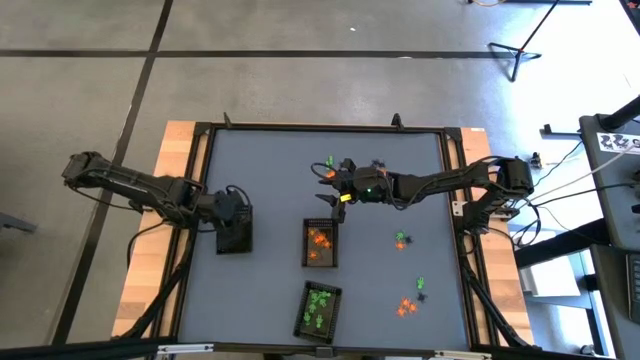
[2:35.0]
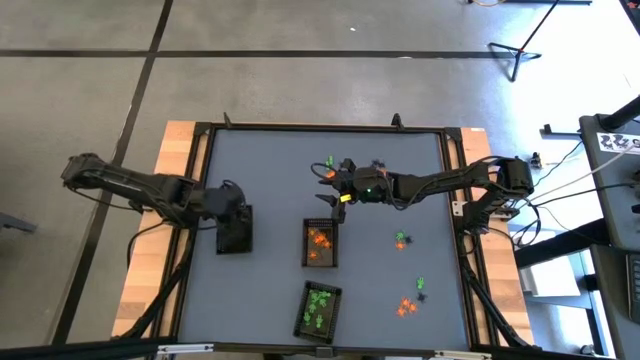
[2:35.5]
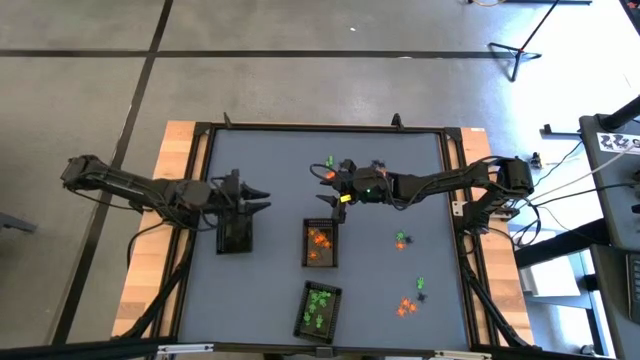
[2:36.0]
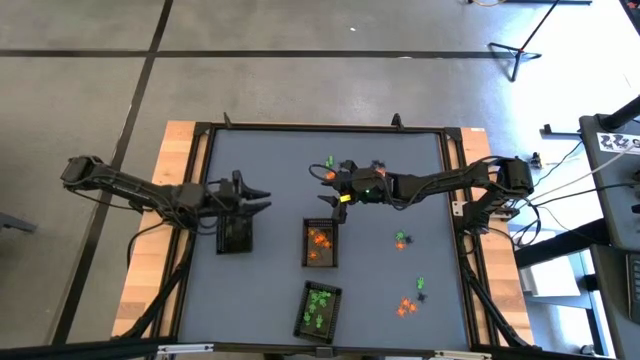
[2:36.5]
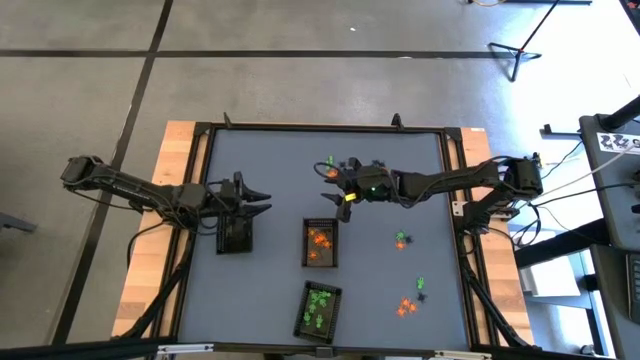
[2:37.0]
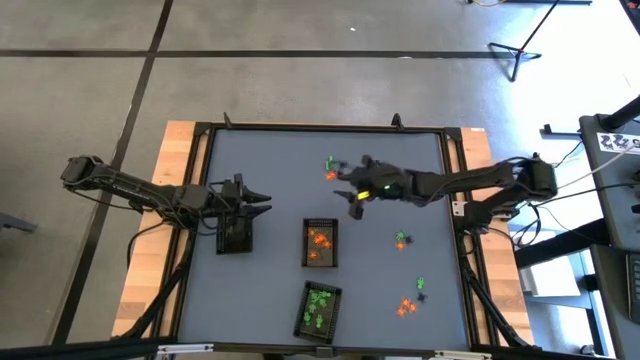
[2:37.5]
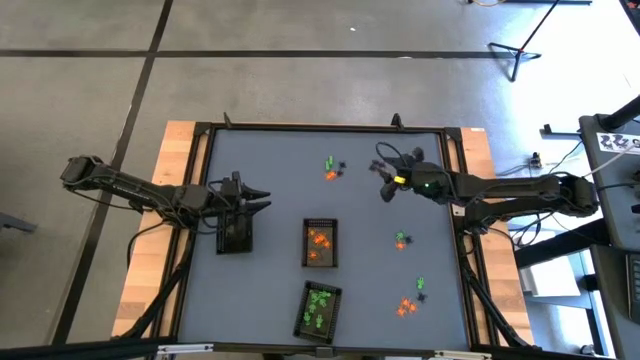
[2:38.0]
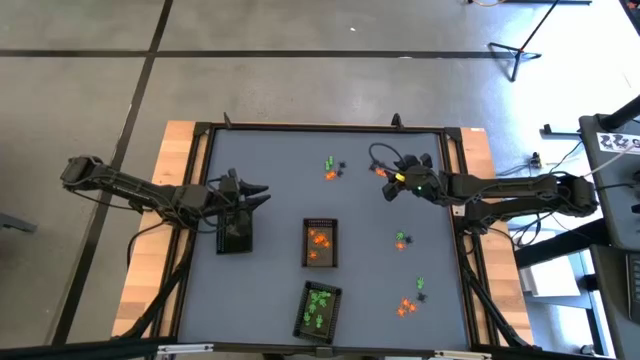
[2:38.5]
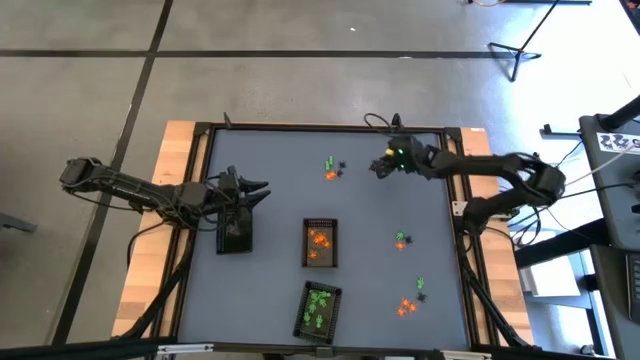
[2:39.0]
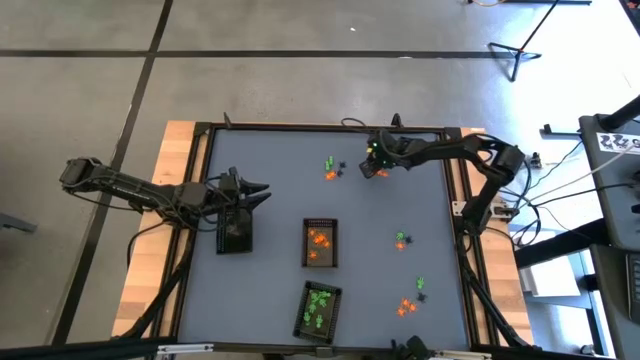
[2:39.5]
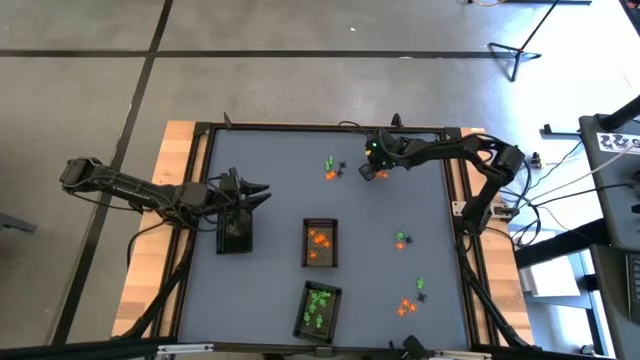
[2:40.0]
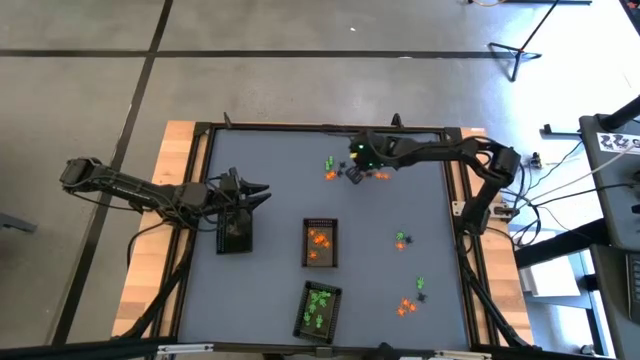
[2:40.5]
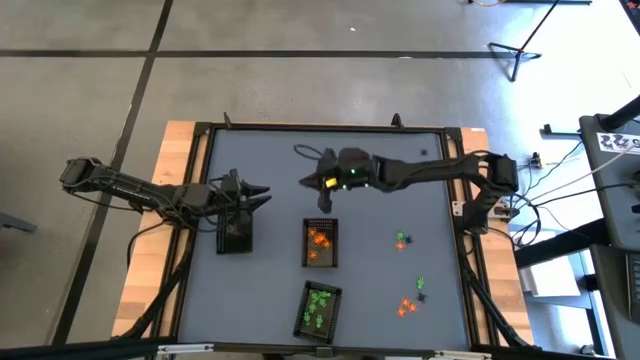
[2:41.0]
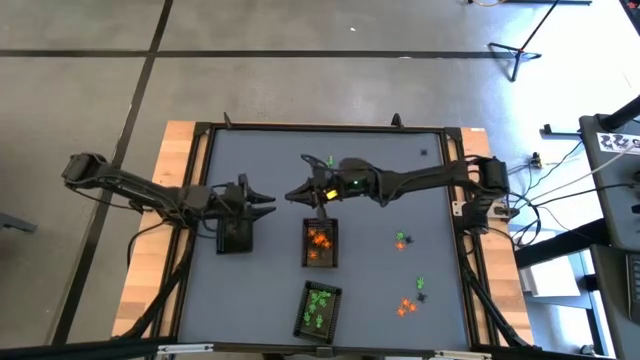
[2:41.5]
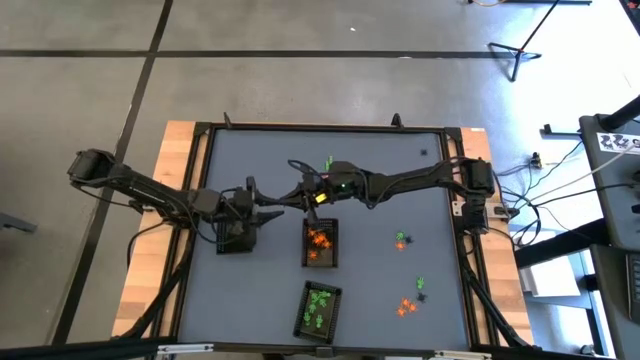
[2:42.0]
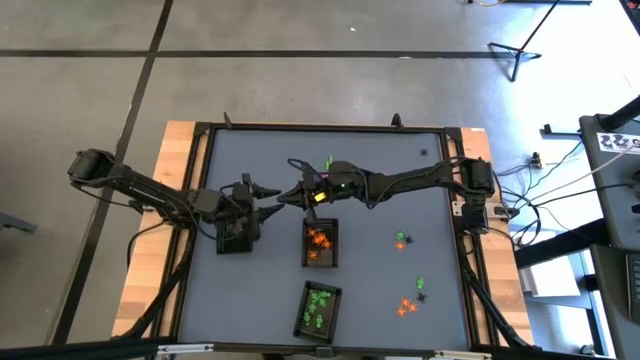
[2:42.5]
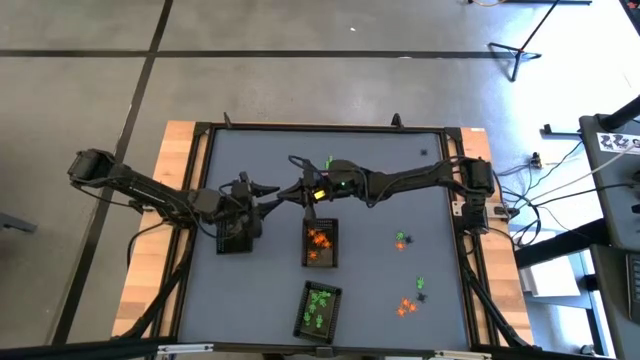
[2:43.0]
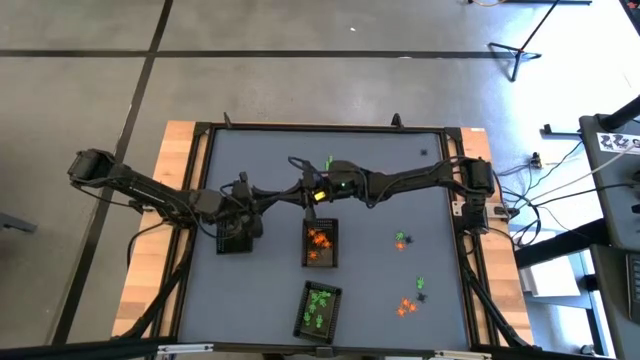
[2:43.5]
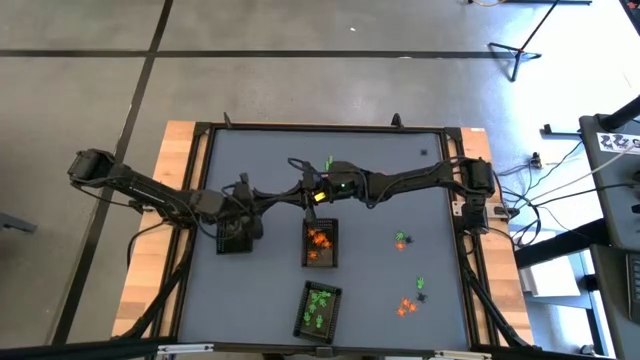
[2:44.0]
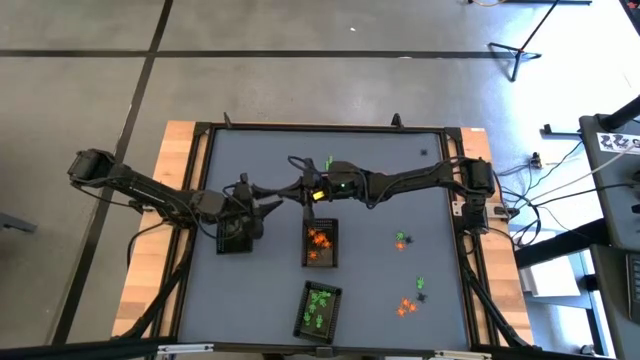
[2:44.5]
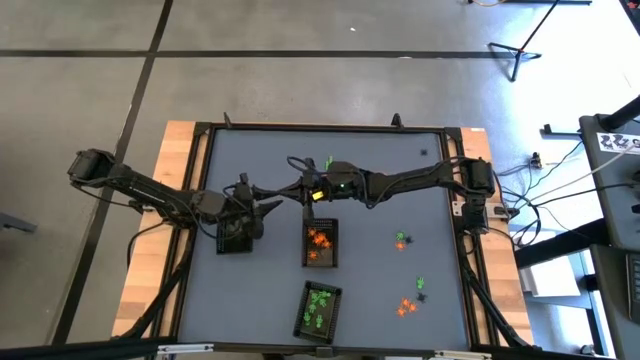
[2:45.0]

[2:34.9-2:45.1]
Task: Sort Halloween decoration
Put the black spider toy into the top left black basket

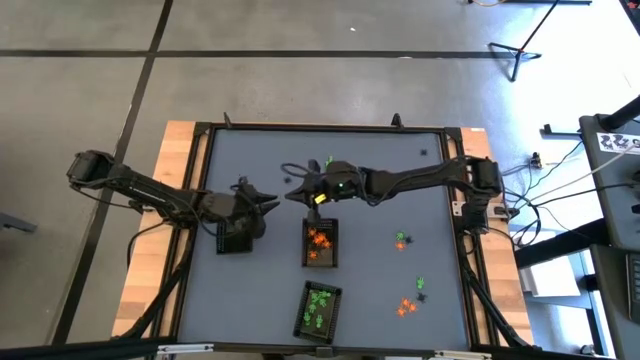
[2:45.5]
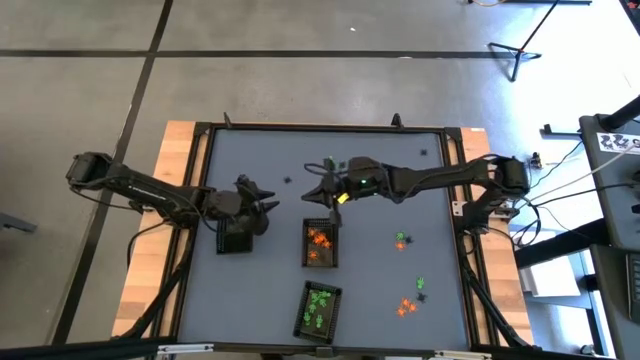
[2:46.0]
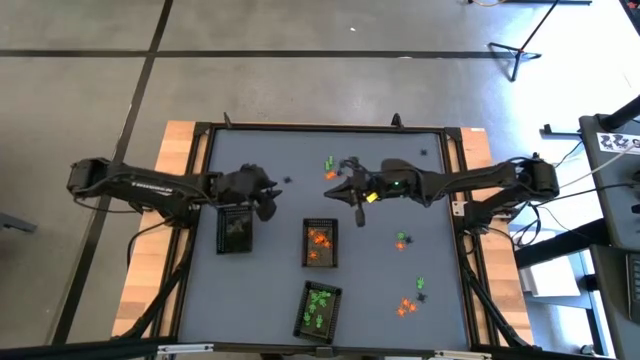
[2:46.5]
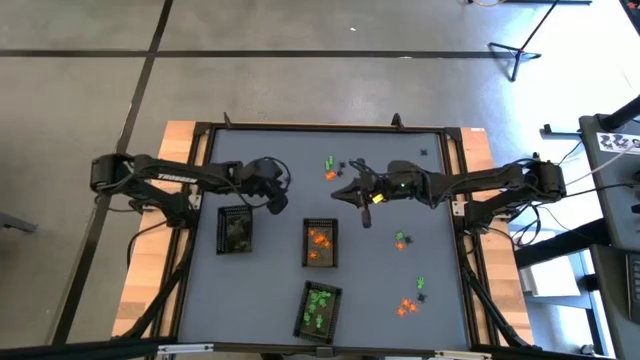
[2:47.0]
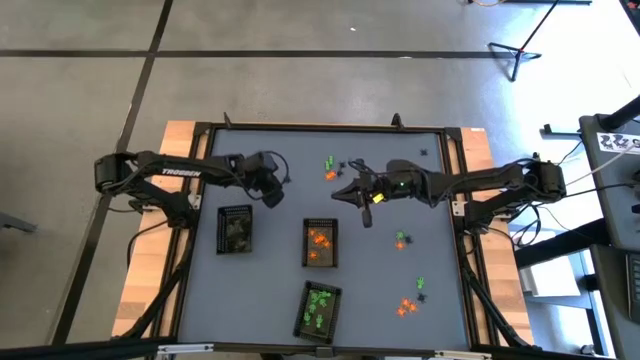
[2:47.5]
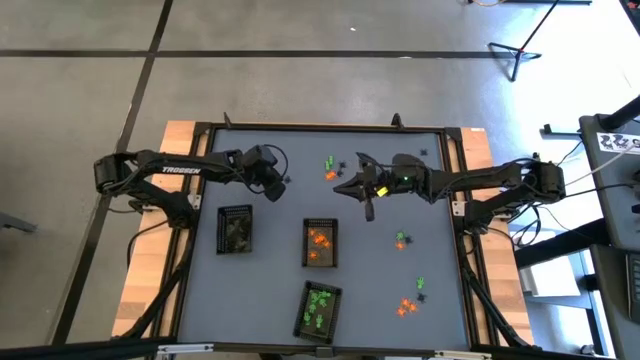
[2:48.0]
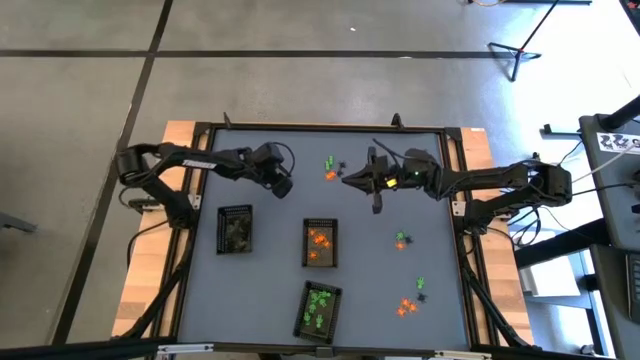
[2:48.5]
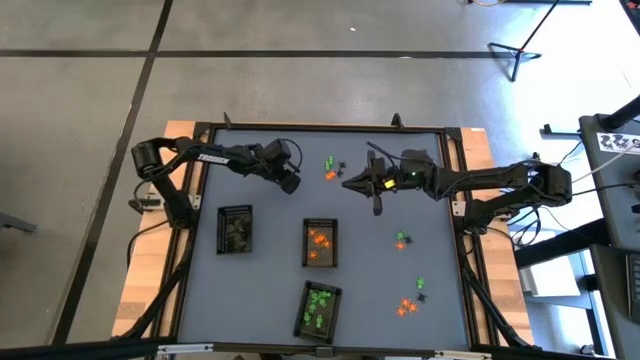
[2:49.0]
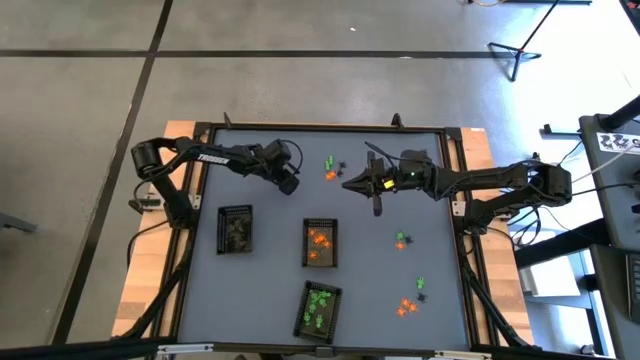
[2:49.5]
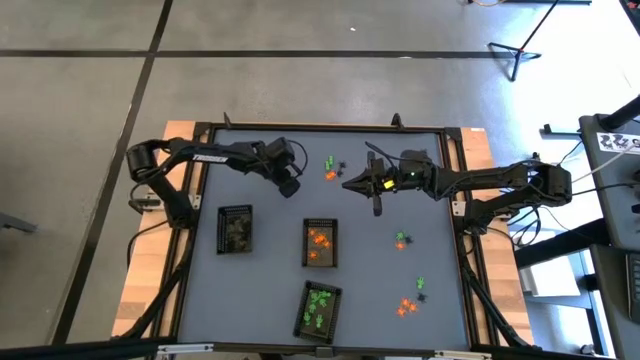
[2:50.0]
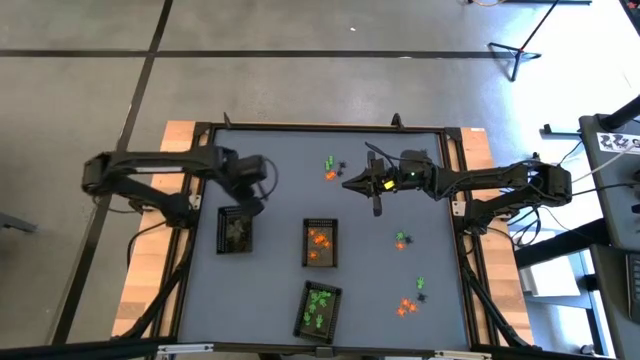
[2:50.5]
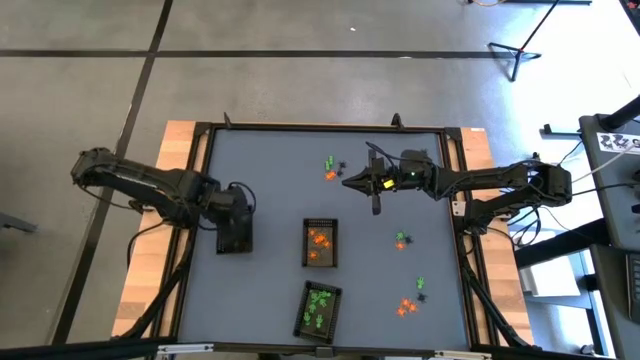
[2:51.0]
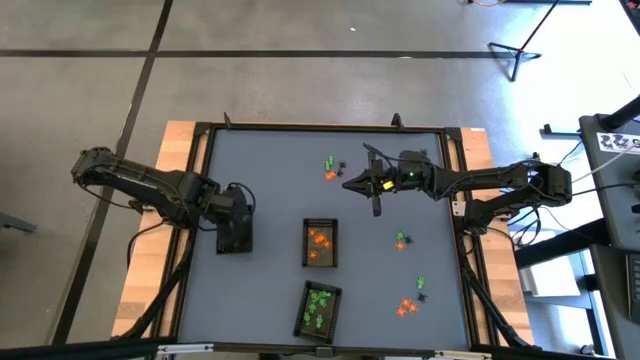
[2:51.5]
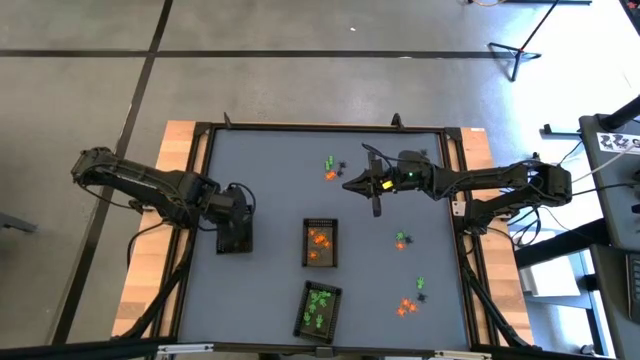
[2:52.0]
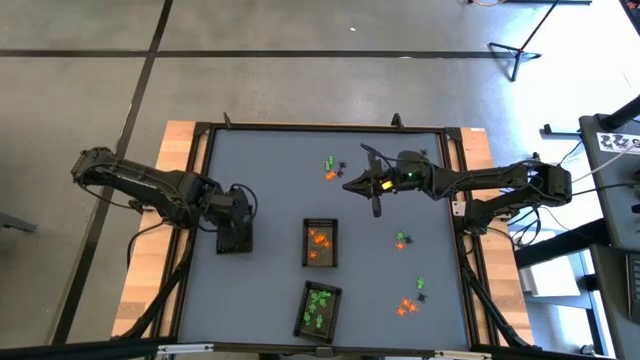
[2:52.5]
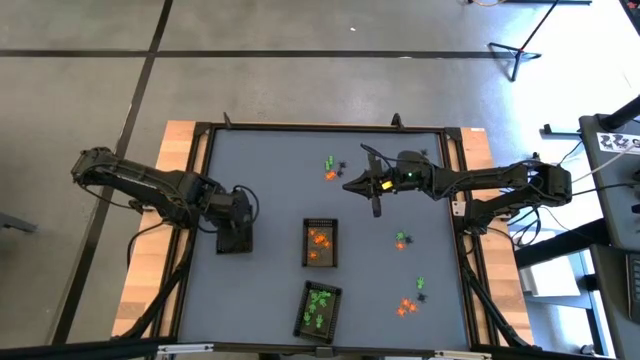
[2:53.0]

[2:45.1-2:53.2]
Put the black spider toy into the top left black basket

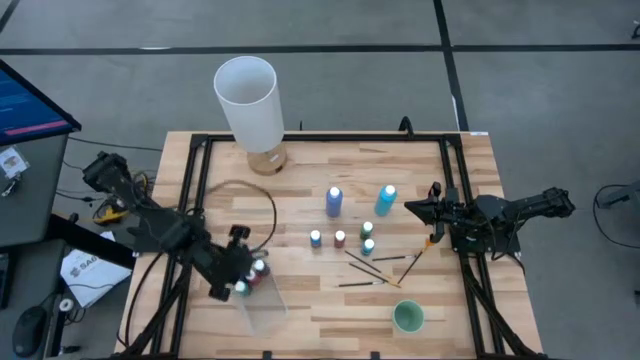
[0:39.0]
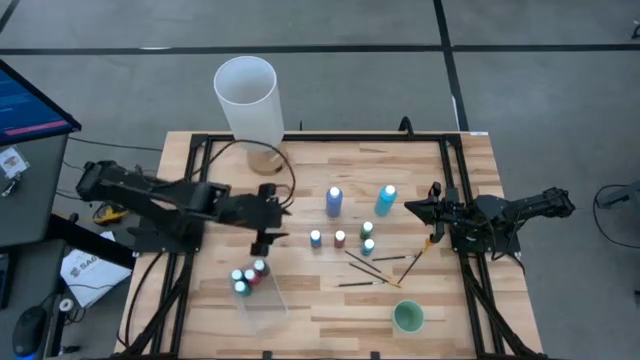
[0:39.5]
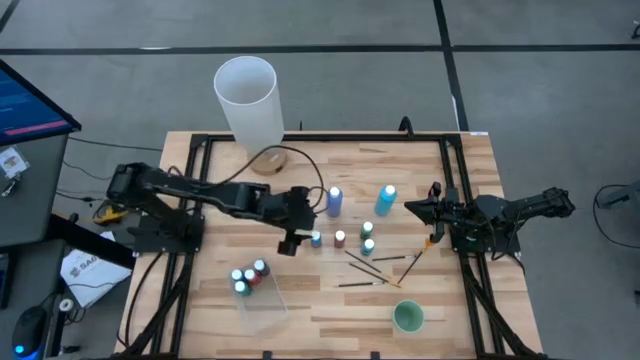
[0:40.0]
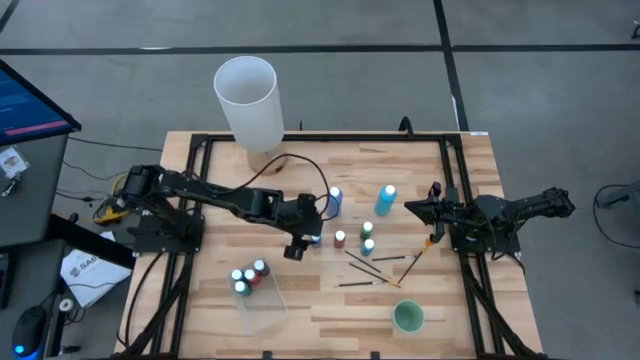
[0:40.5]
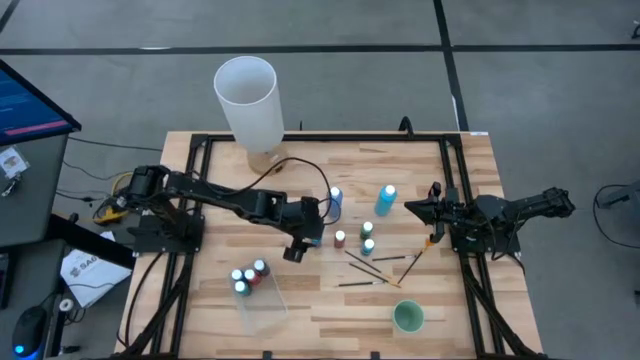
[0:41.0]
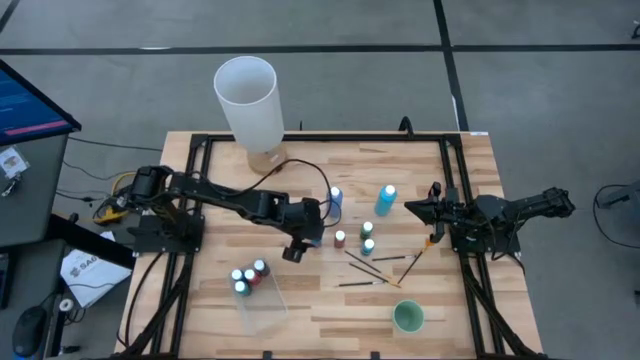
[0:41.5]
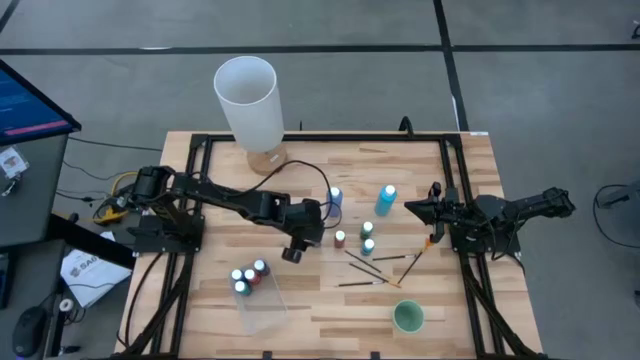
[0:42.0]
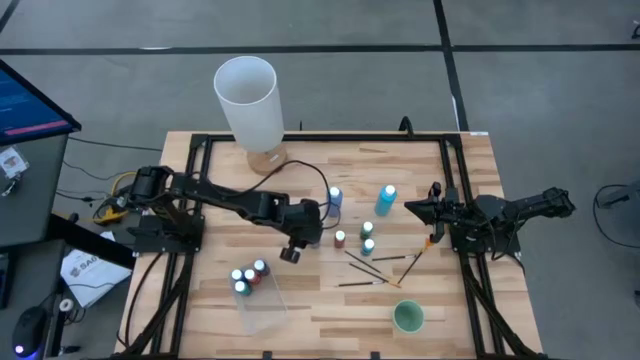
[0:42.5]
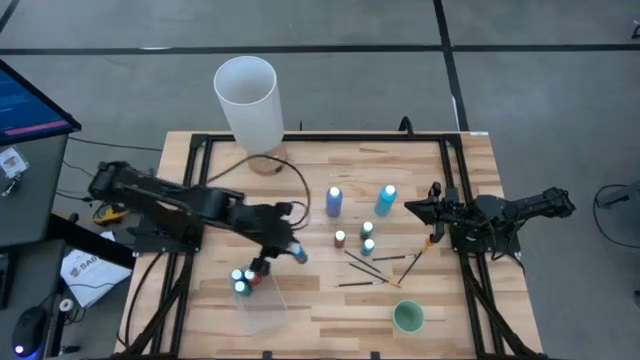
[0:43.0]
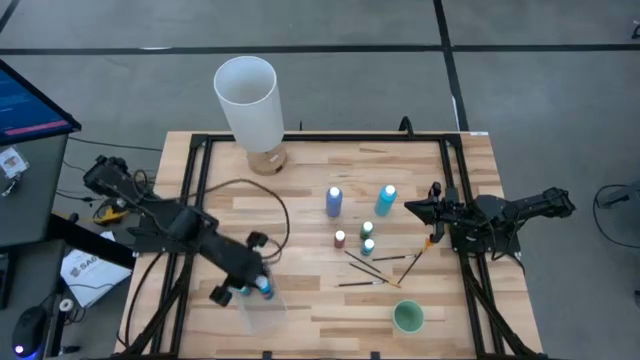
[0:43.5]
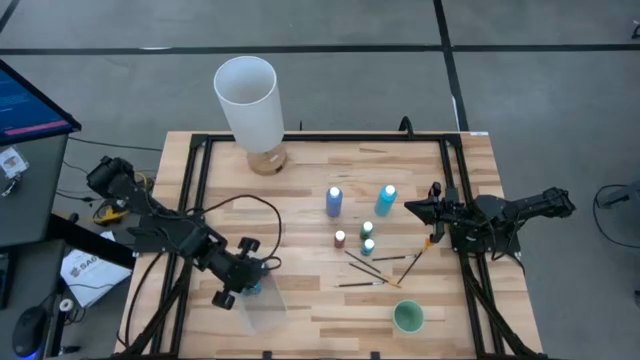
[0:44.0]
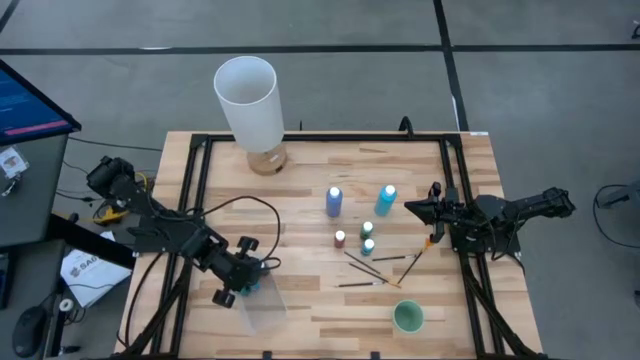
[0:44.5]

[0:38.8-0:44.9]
Task: Pick & Place Paint Supplies
Put the blue paint bottle into the transparent bin
